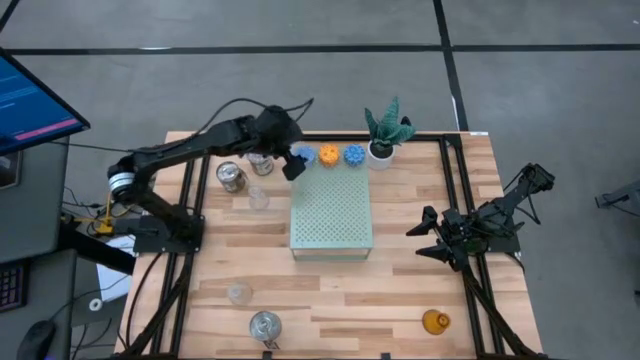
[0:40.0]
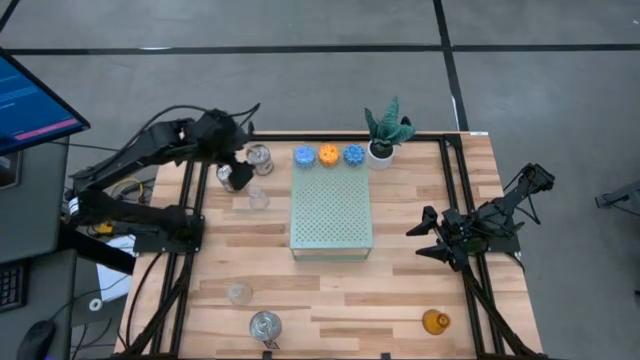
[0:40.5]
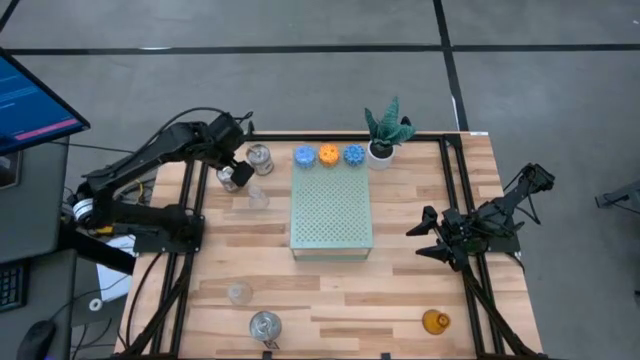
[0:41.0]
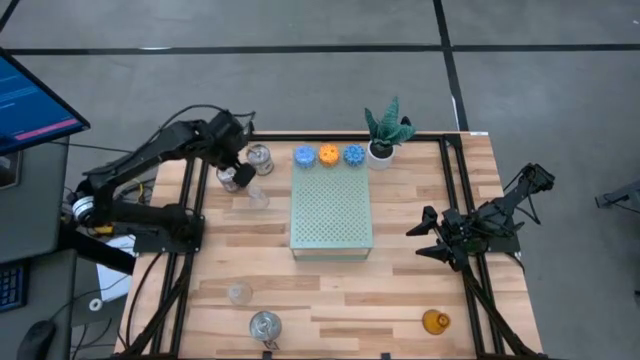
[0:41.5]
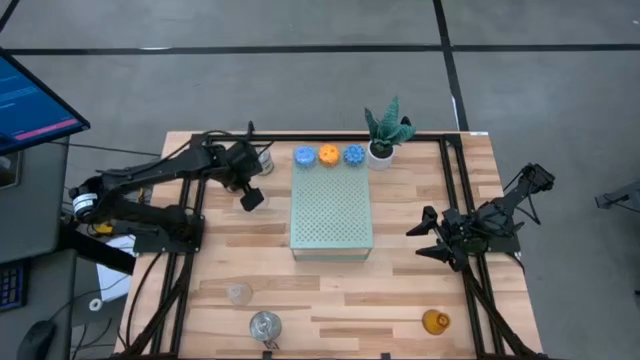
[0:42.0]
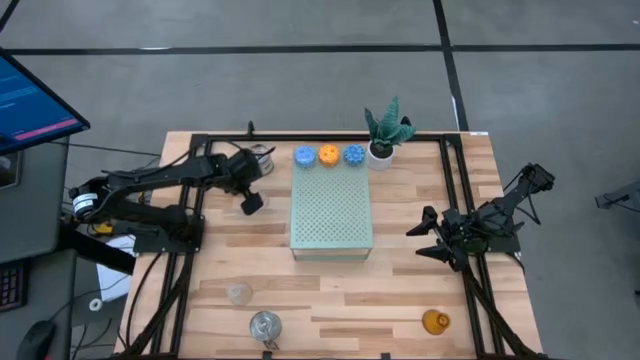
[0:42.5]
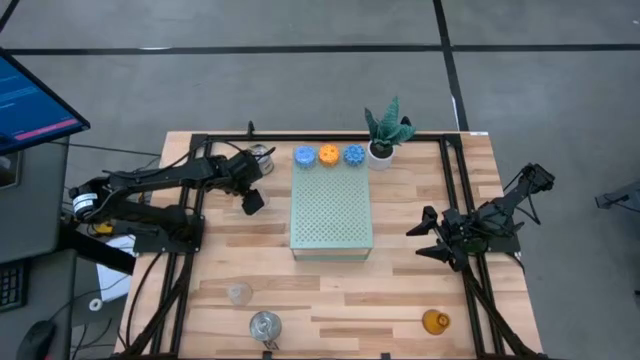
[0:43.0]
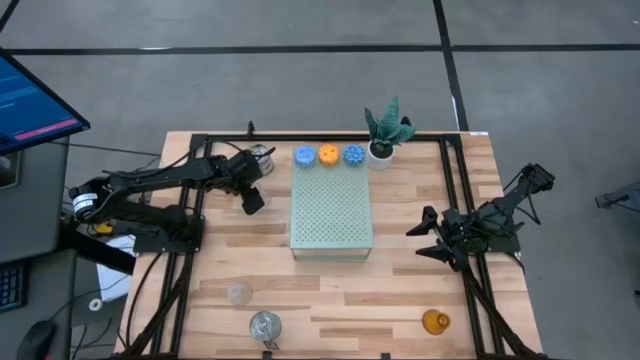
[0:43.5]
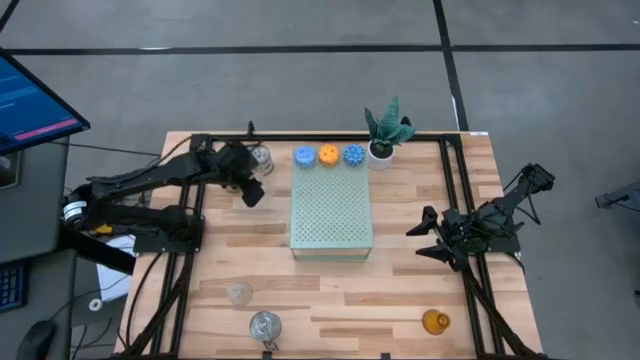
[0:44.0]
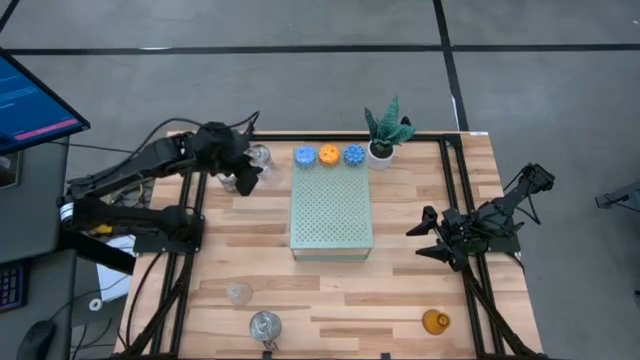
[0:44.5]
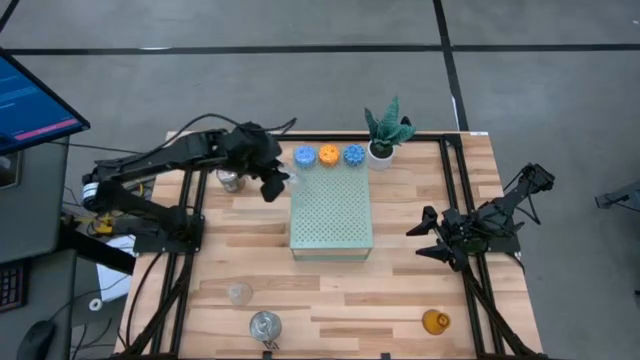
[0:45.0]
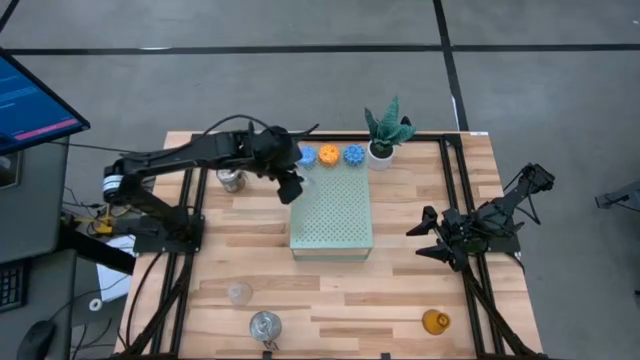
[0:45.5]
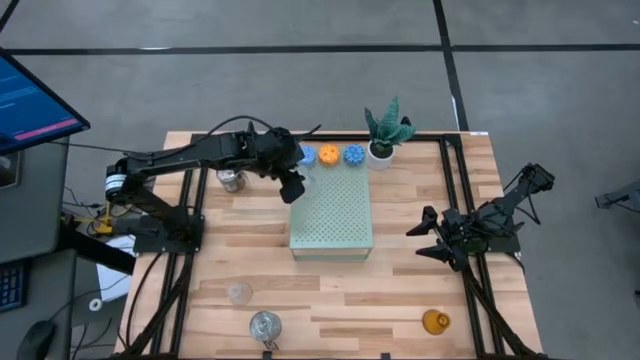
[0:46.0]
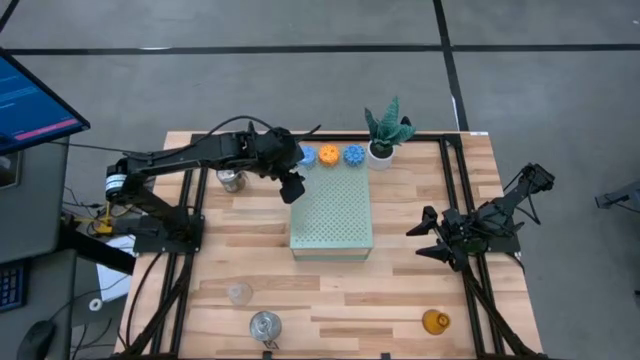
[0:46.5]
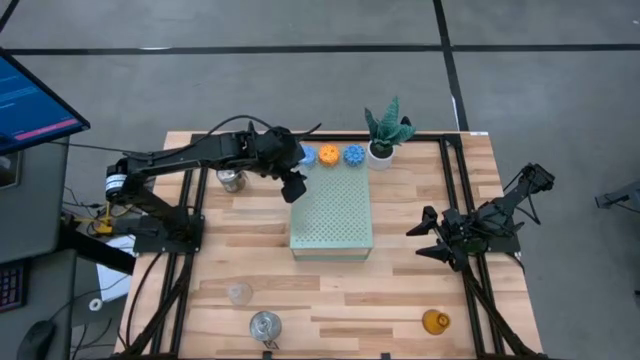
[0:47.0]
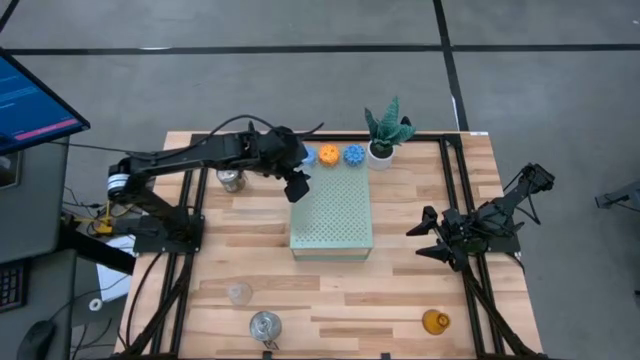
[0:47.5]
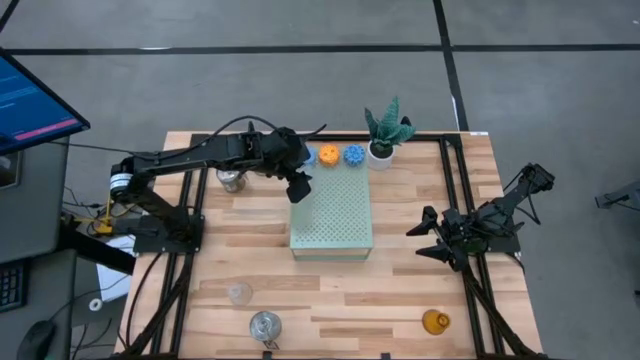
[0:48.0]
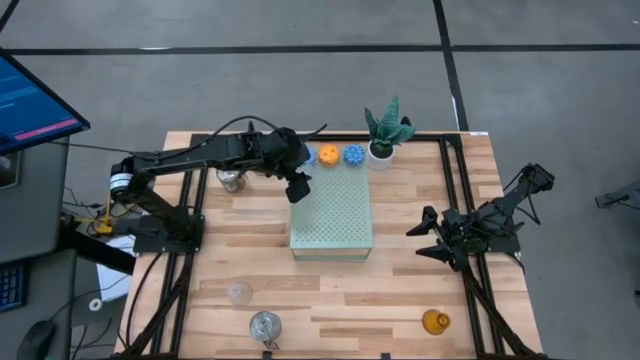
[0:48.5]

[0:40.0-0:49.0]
Task: Stock candles and holders on shelf
Put the top transparent candle holder on the shelf

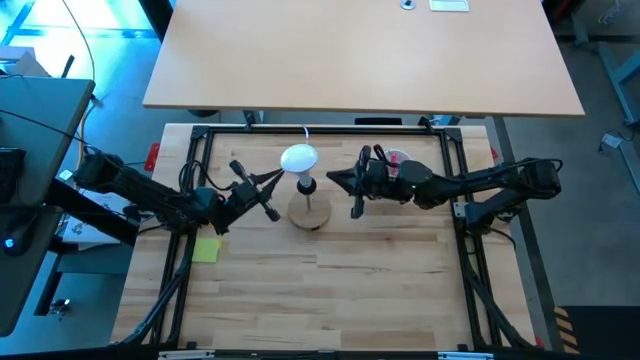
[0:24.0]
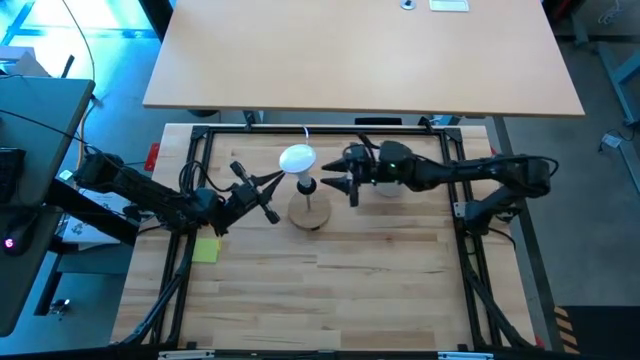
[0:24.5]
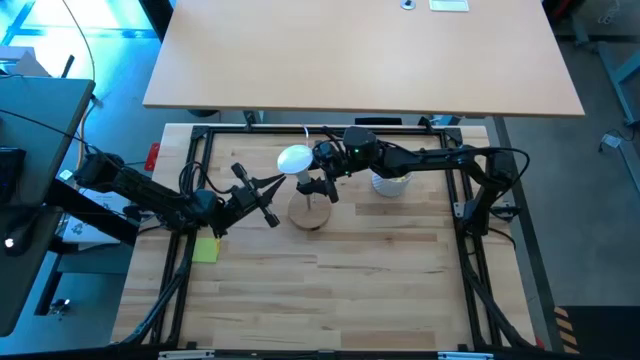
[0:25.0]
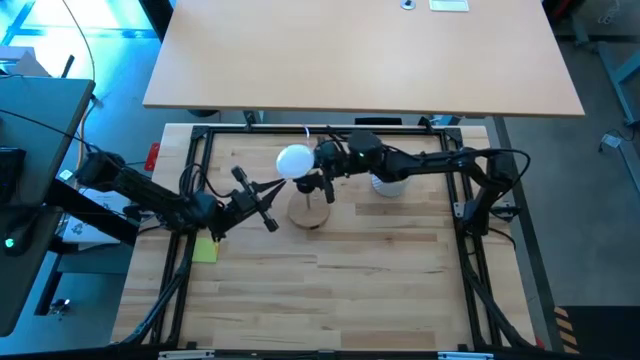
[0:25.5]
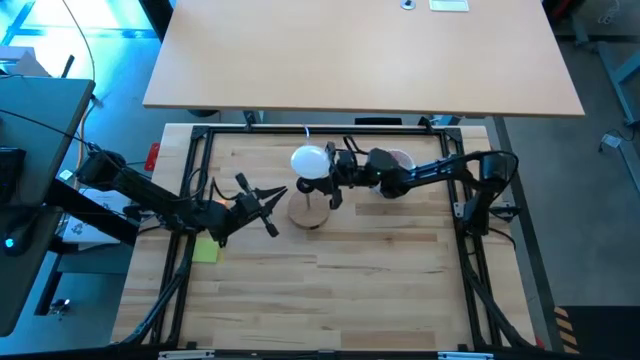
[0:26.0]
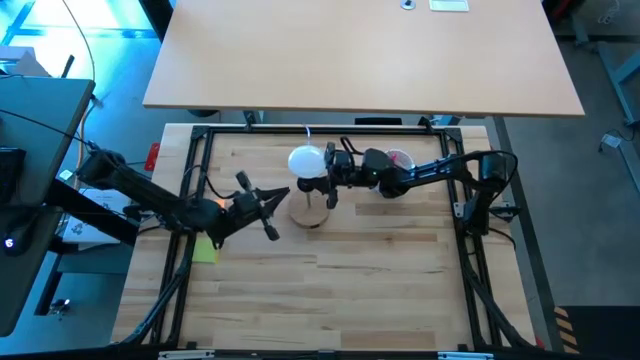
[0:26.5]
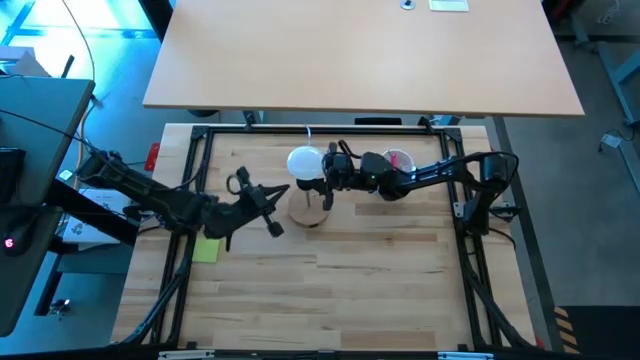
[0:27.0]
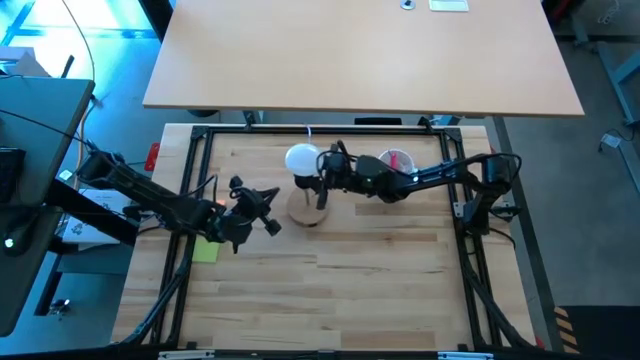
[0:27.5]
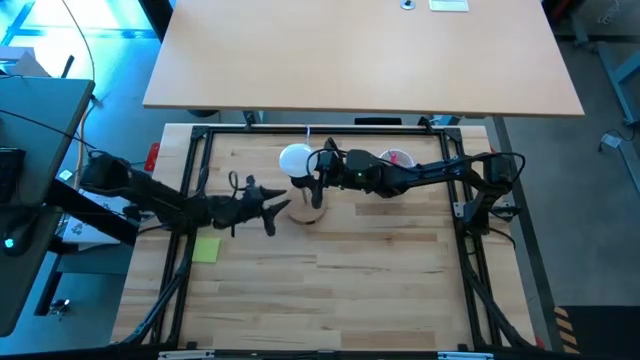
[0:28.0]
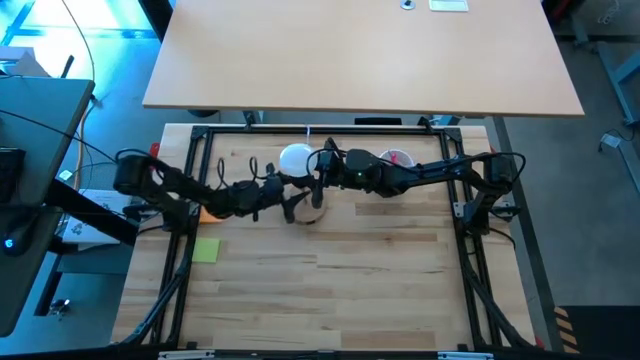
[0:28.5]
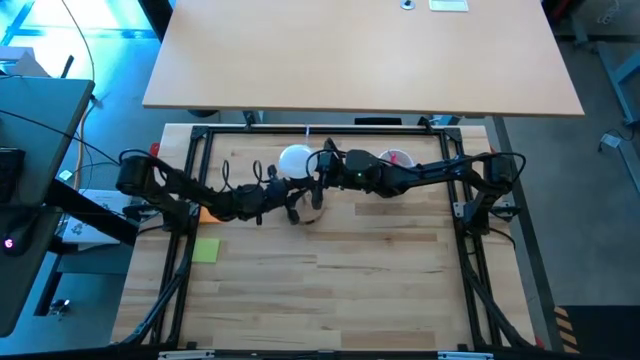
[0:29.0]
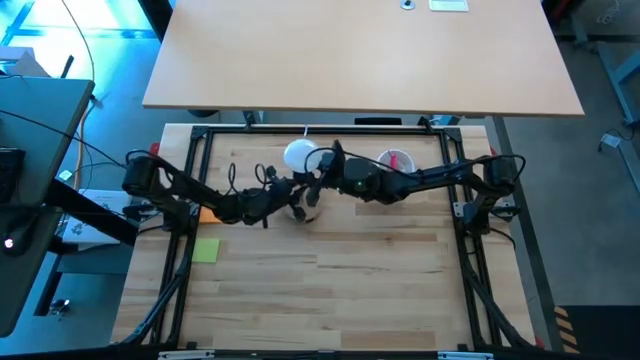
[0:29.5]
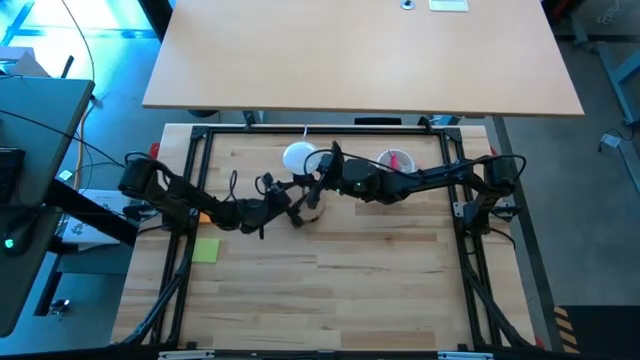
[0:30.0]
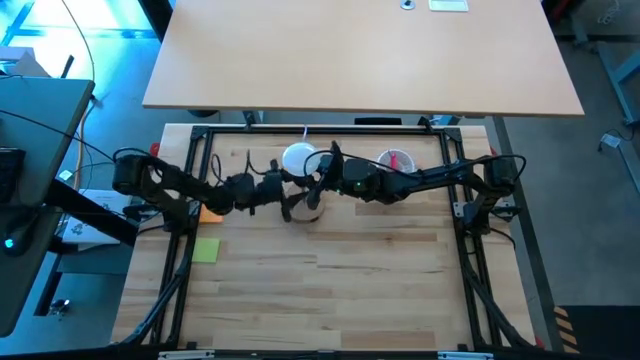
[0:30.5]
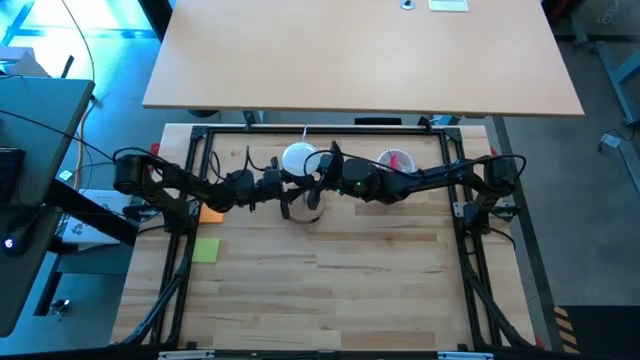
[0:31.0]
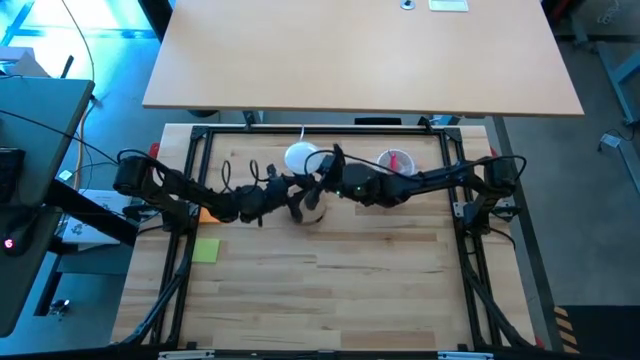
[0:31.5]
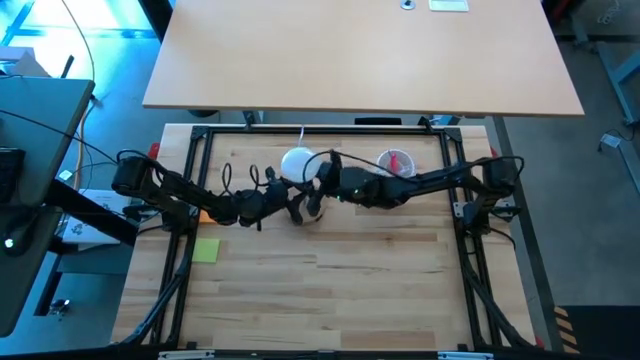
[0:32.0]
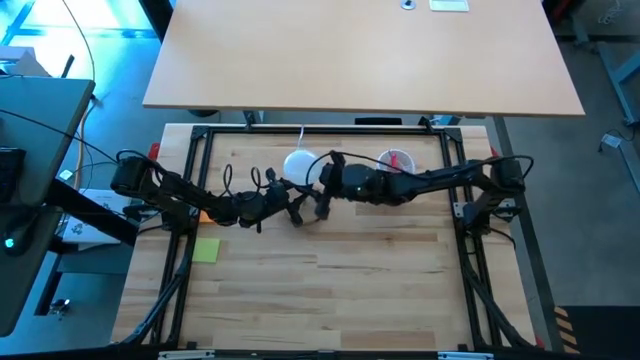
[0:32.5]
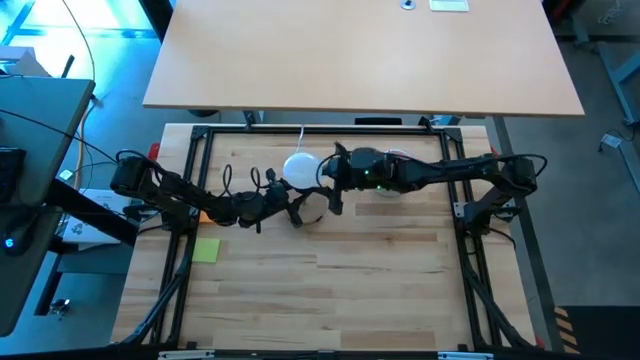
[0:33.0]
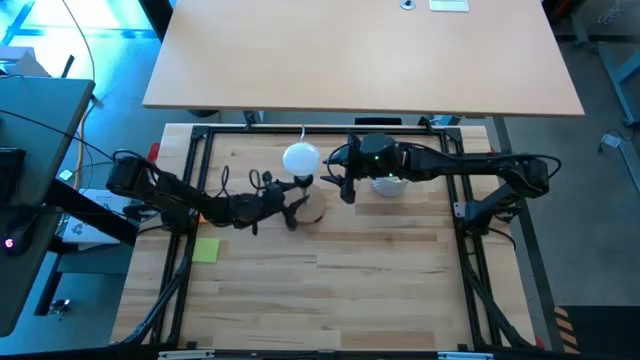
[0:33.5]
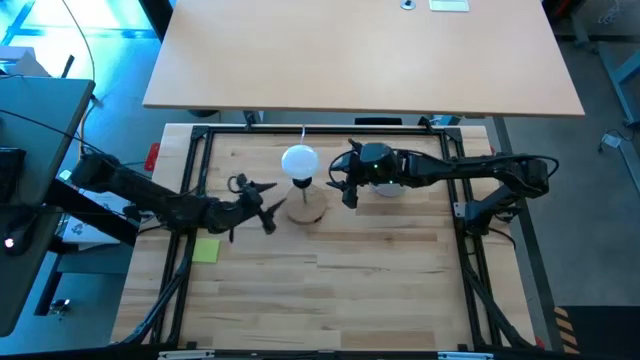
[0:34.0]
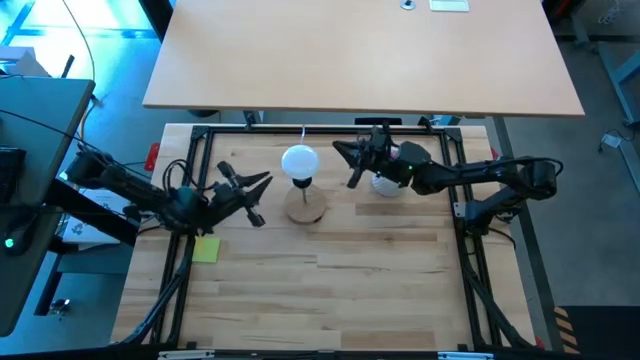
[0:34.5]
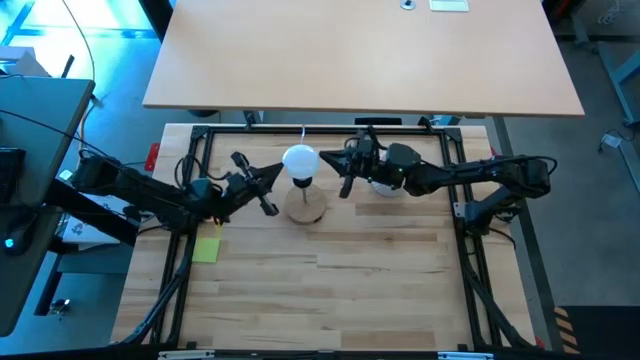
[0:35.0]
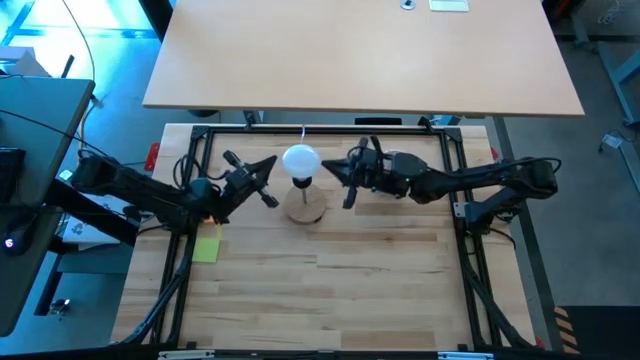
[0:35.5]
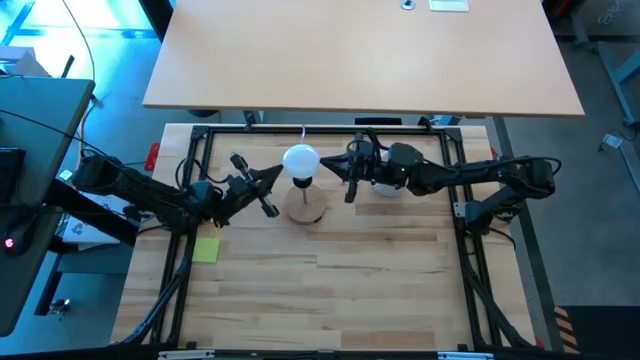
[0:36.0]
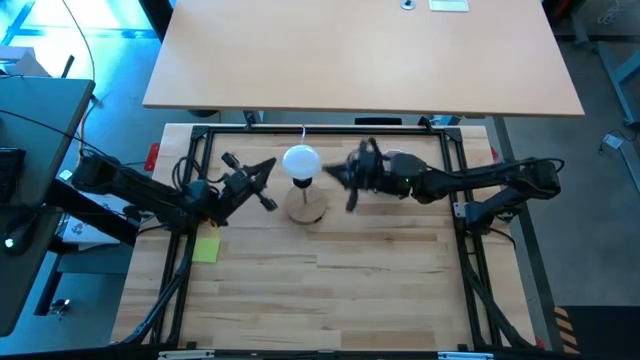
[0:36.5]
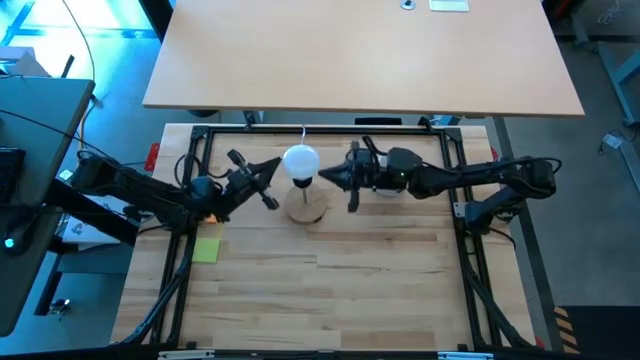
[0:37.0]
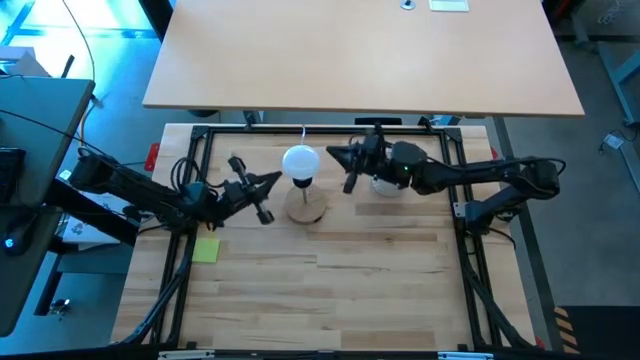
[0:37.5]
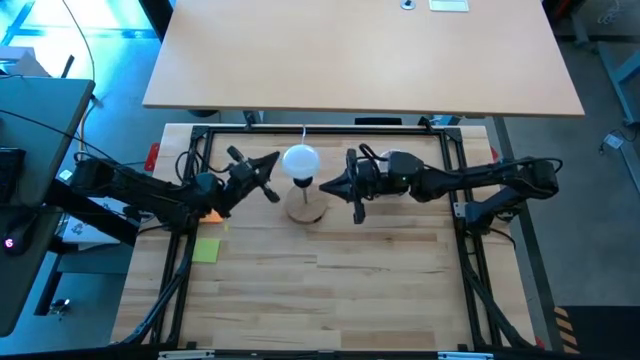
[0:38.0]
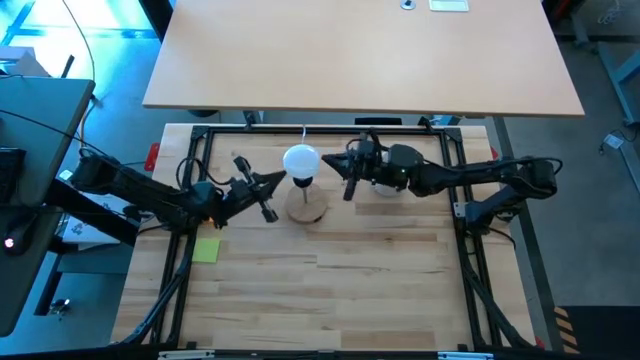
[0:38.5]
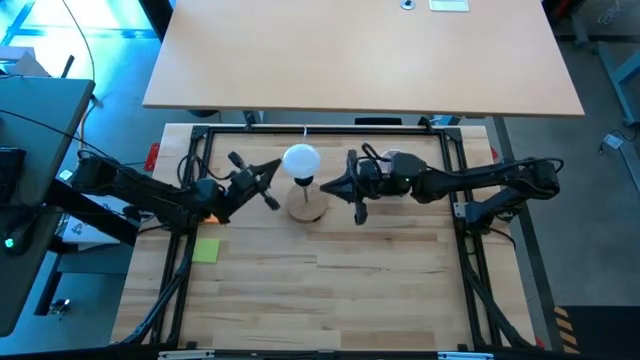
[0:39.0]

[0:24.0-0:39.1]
Task: Screw lightbulb
Insert the lightbulb into the lamp
